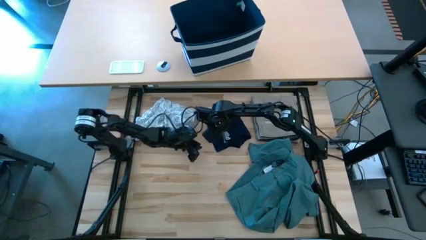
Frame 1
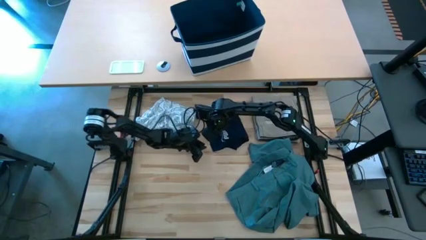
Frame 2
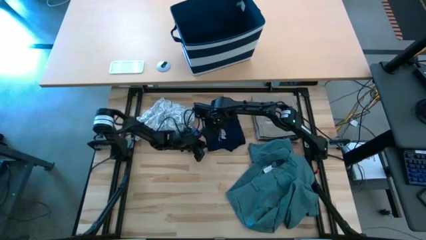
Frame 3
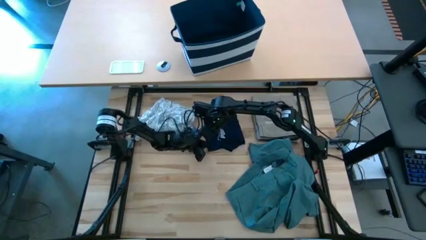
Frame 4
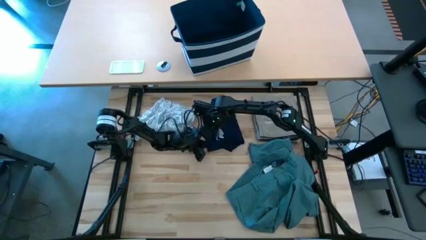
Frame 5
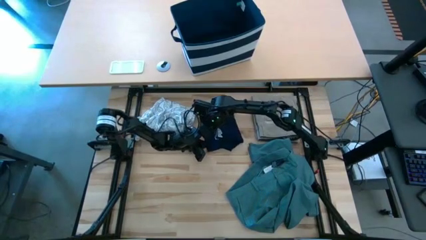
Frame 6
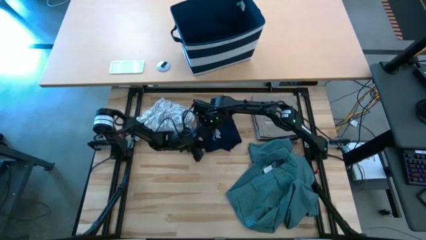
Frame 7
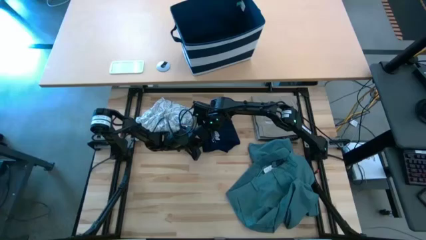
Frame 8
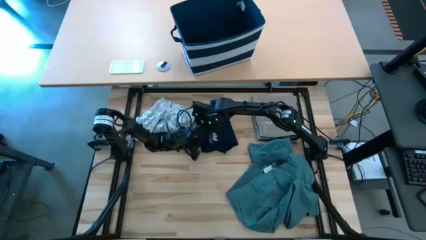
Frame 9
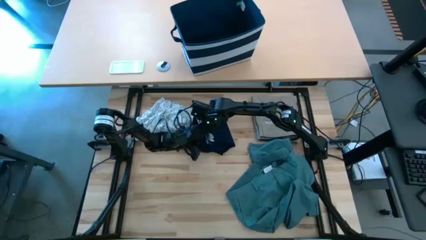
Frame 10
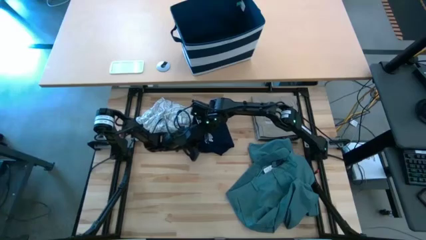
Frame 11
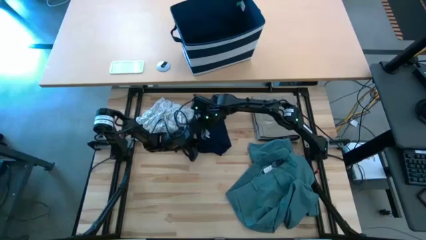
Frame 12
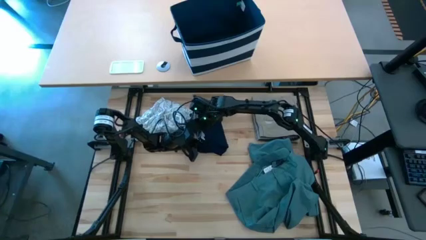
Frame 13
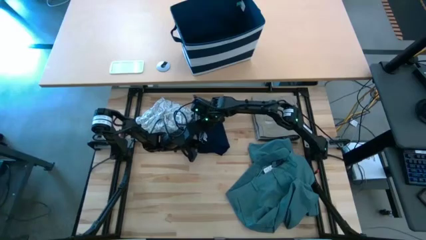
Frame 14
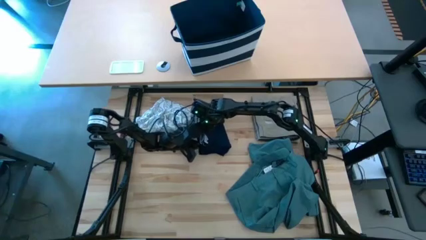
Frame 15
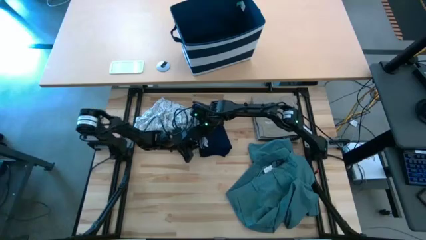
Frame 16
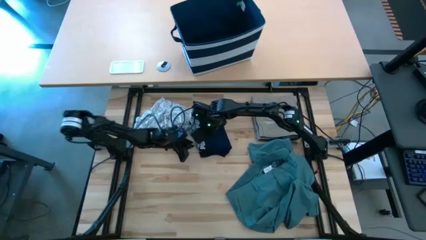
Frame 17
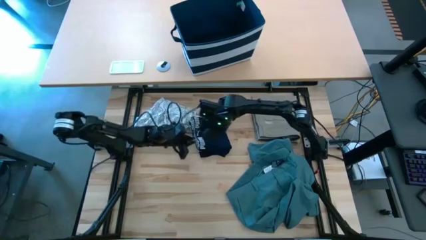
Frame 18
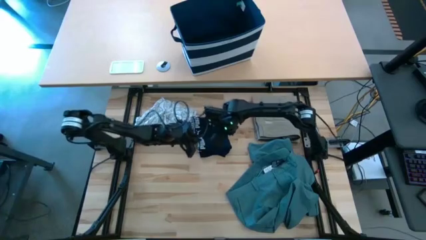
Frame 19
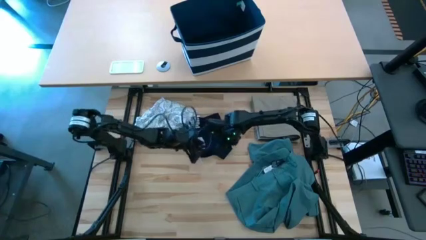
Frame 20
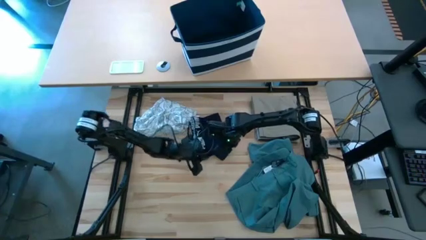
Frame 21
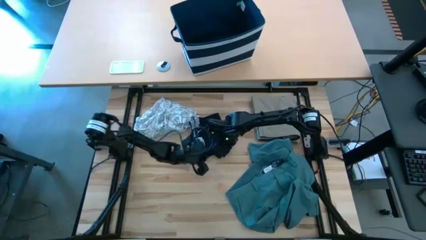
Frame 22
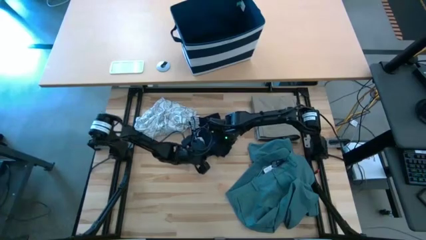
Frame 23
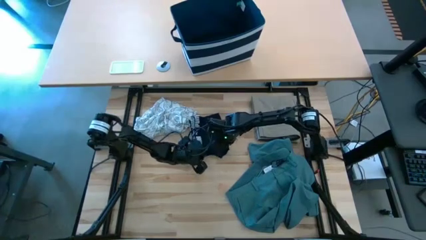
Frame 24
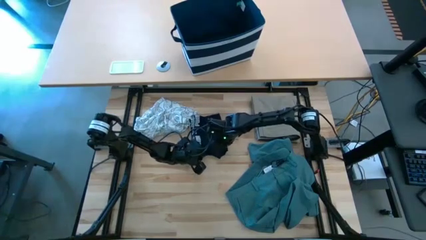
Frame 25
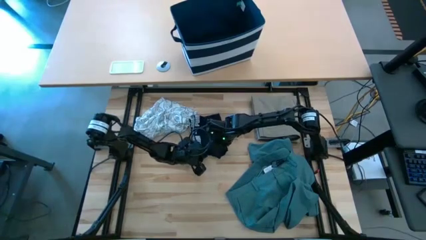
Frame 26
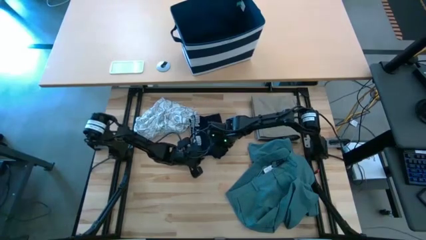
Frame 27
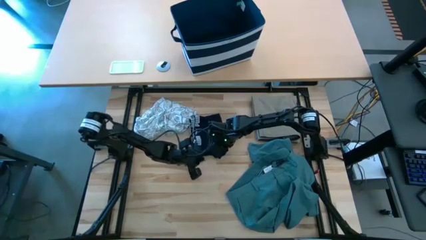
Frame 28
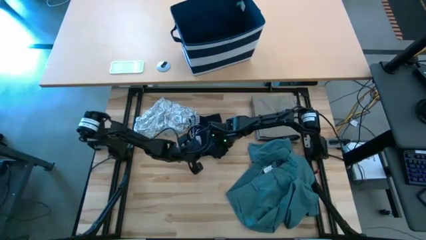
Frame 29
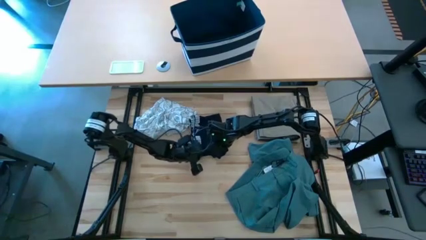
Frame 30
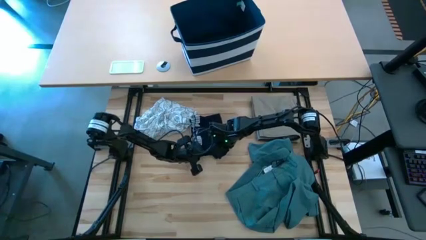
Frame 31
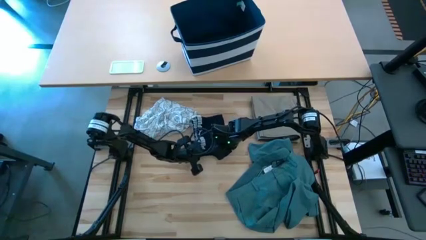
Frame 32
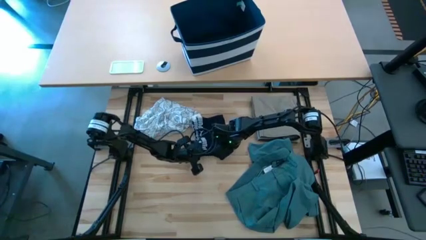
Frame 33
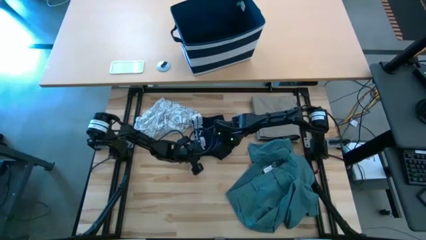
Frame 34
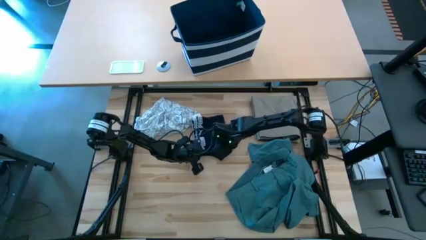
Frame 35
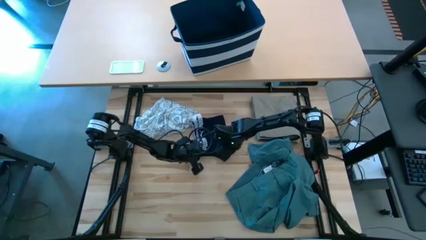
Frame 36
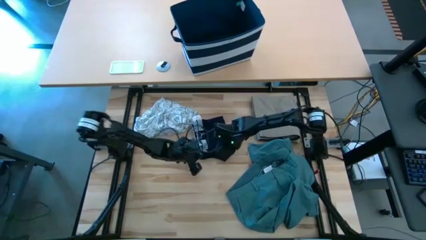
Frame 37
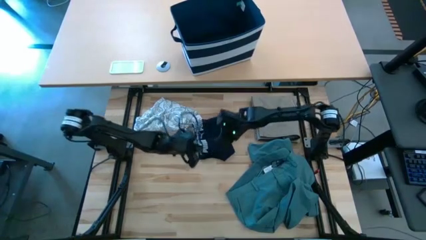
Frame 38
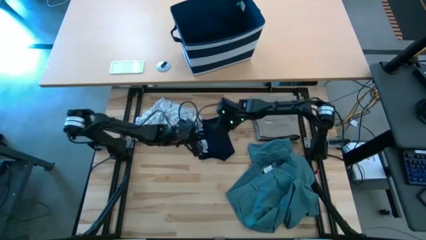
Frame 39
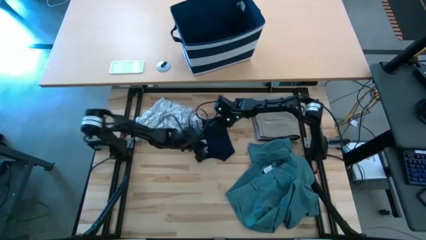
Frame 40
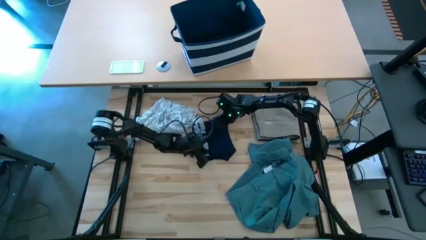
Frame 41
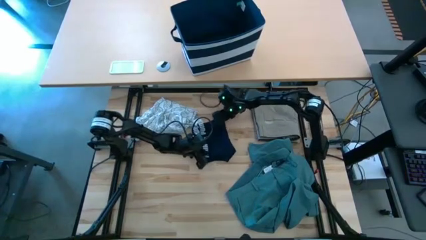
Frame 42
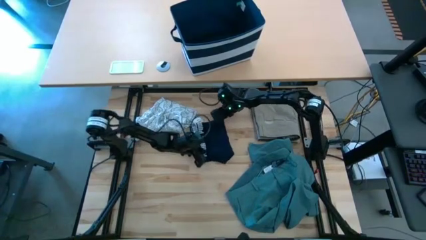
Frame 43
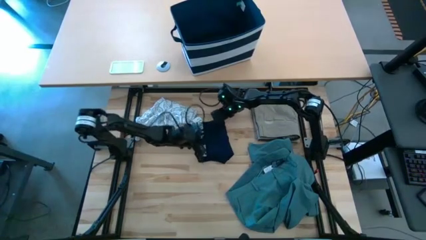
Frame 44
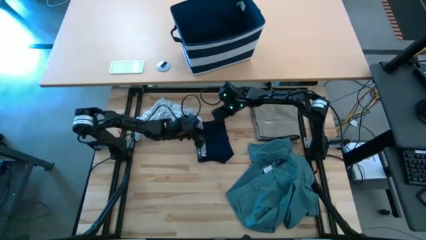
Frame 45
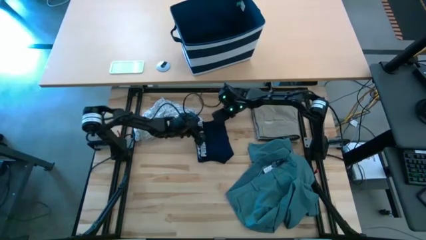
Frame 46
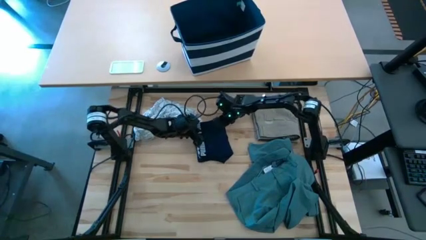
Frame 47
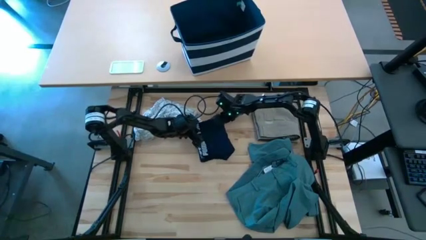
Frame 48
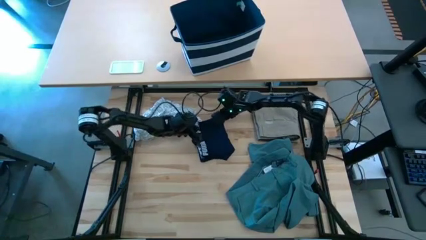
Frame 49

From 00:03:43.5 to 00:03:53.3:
Task: Fold Laundry from Bin
Fold the blue boxer

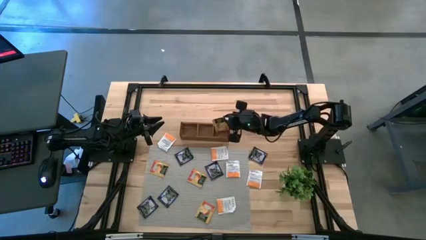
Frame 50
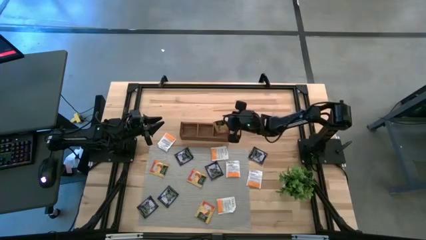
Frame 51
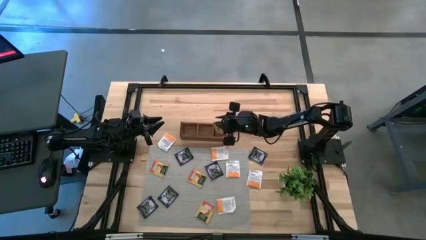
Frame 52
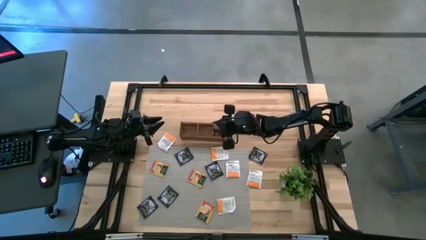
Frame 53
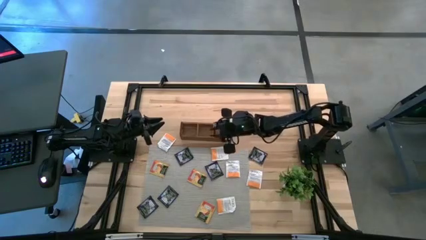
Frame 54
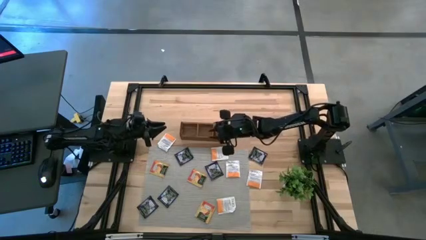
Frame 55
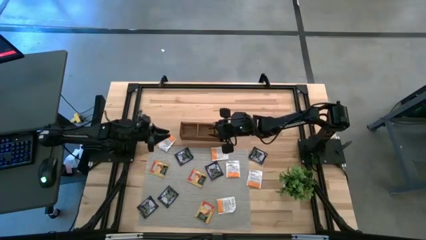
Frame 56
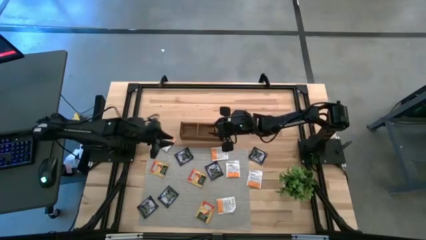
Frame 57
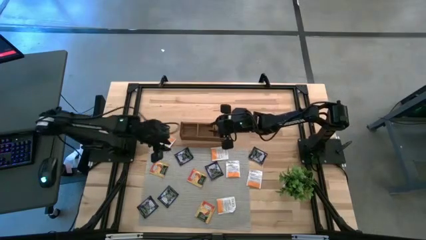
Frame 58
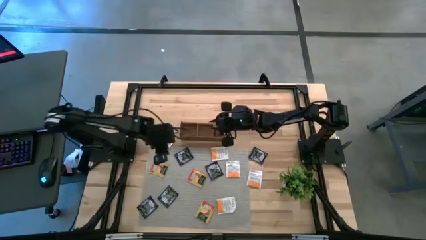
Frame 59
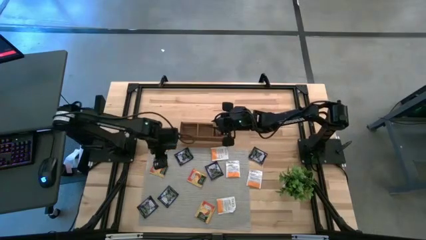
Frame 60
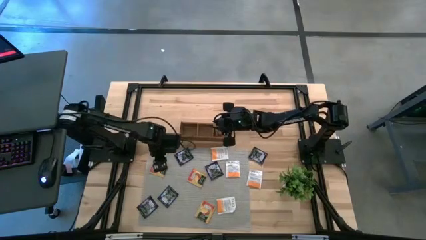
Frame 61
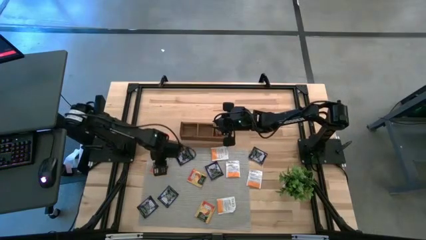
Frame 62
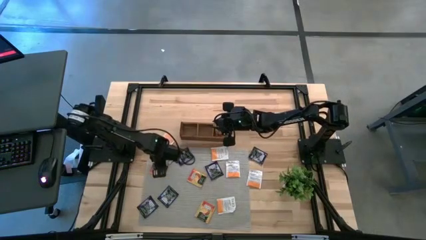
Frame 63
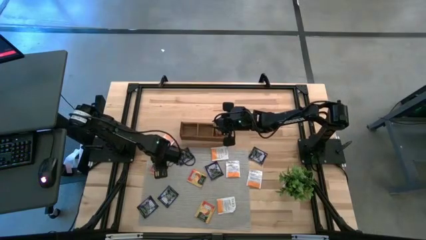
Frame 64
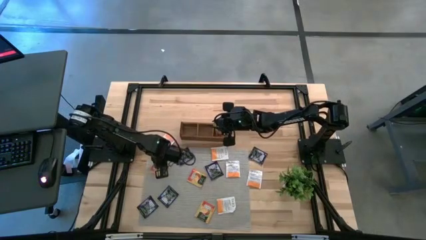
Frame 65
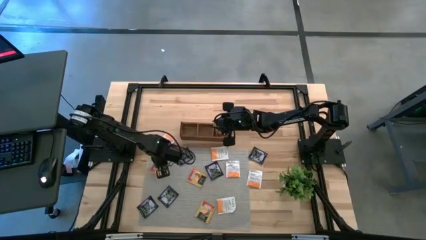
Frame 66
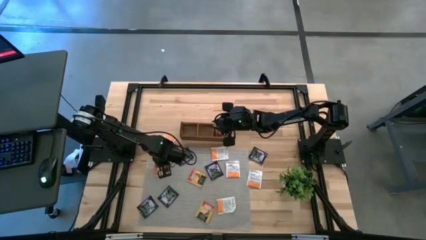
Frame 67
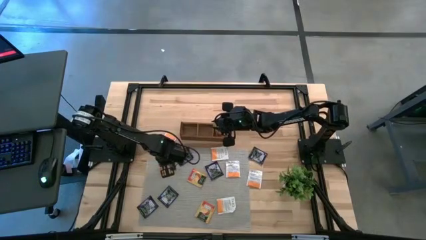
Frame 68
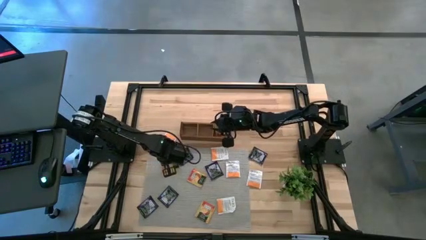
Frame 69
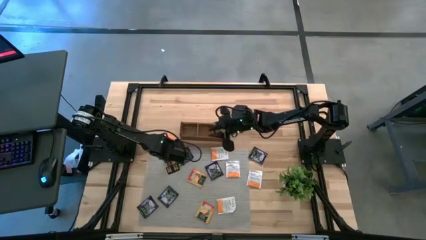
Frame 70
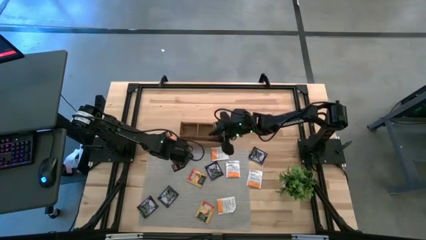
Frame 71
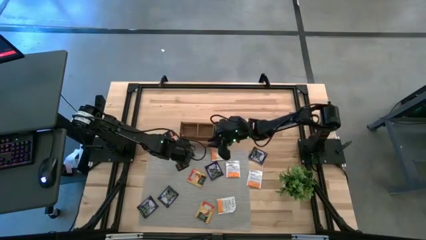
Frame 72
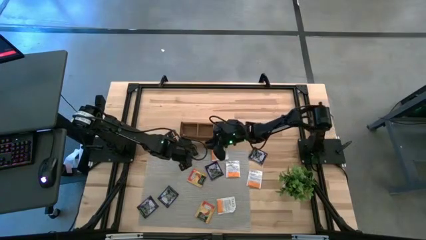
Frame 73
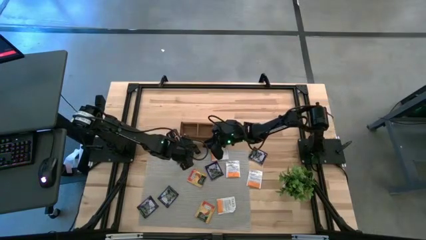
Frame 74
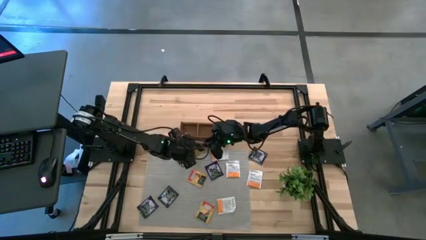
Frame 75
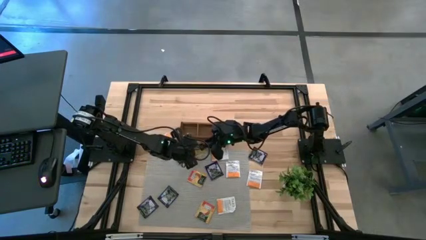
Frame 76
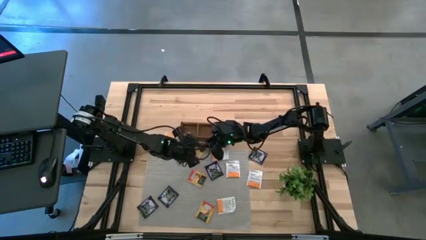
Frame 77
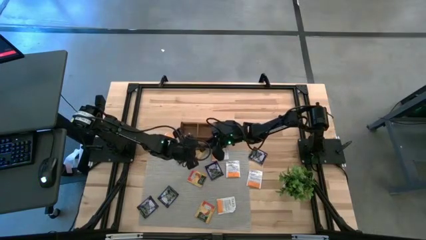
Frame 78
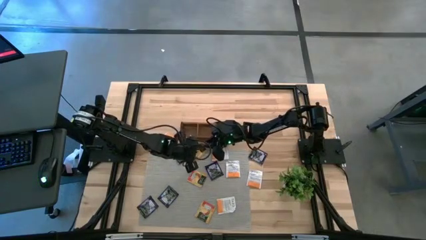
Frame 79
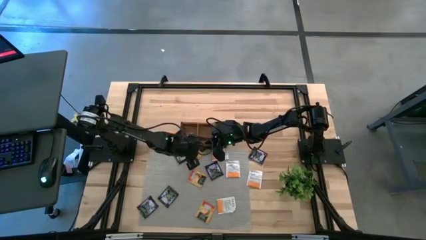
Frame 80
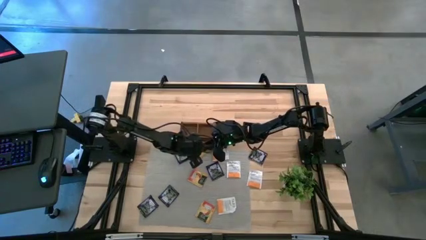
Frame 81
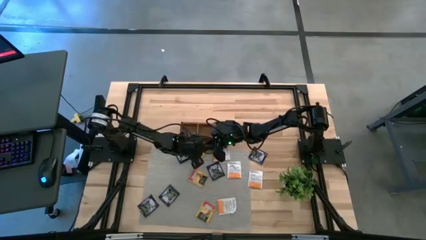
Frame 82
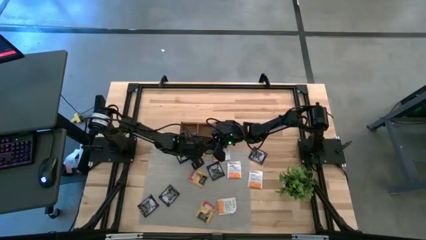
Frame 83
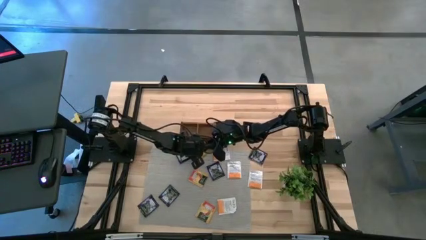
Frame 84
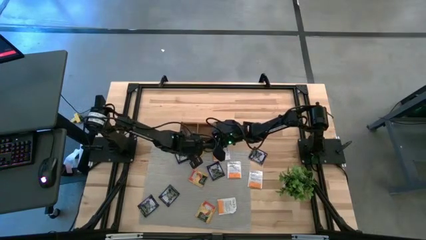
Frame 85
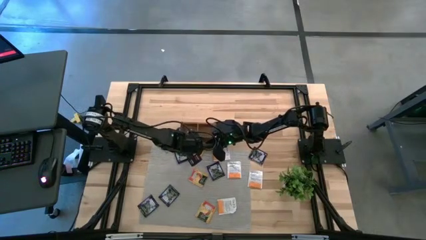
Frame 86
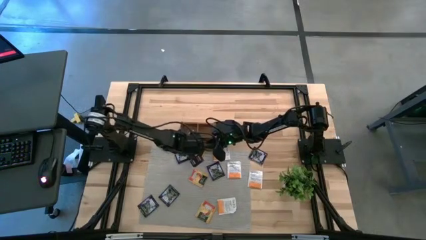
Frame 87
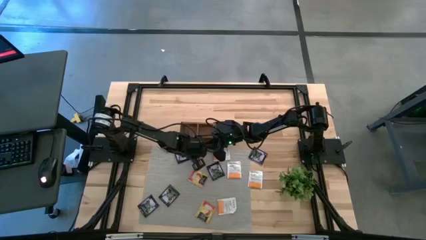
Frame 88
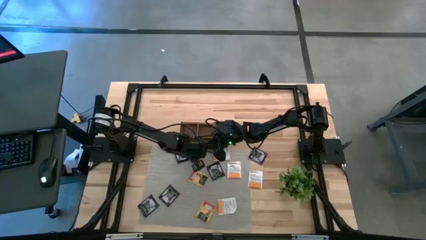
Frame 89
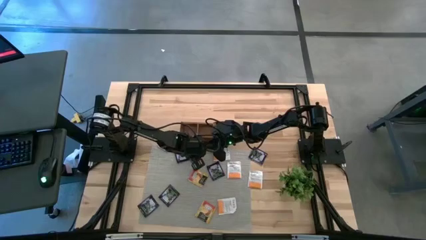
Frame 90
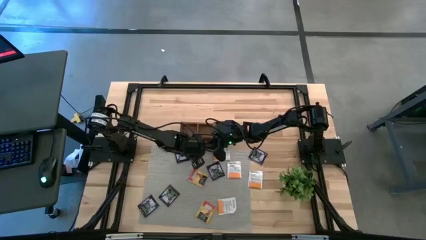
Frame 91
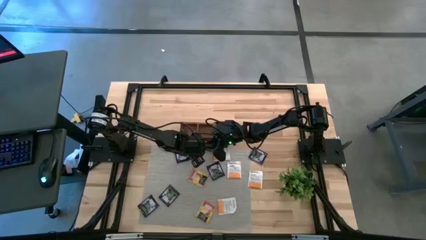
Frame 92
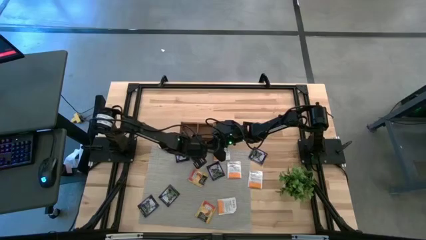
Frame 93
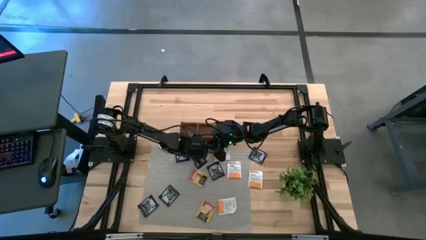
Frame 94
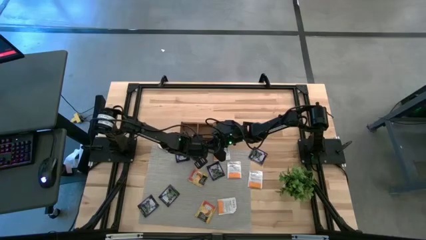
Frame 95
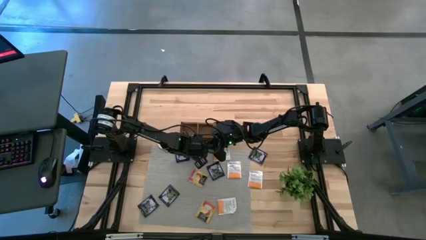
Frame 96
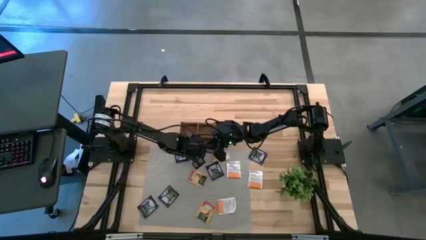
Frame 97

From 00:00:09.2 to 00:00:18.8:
Task: Pick & Place Tea
Put the yellow tea bag into the right section of the wooden organizer
